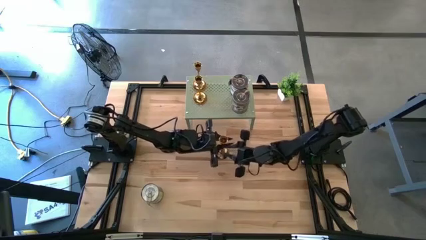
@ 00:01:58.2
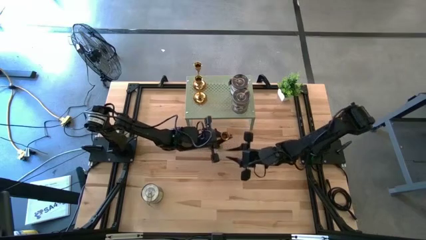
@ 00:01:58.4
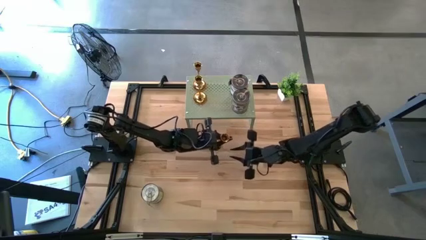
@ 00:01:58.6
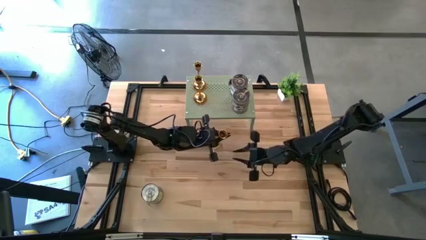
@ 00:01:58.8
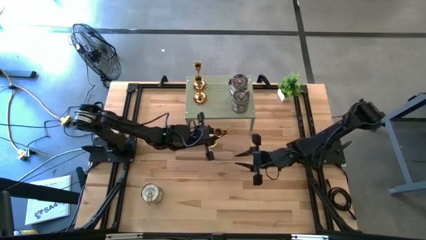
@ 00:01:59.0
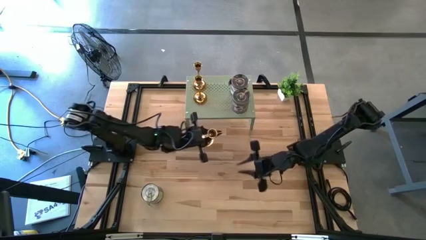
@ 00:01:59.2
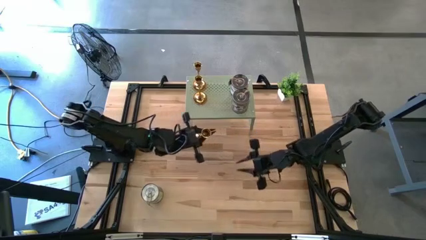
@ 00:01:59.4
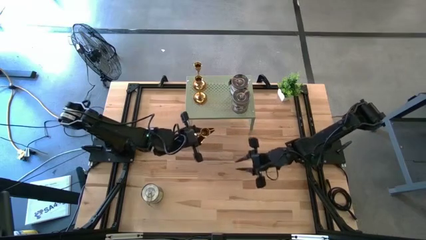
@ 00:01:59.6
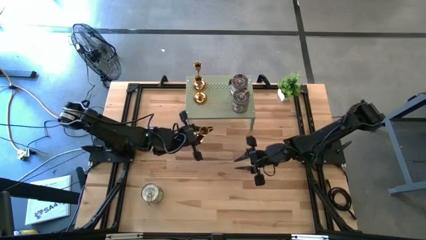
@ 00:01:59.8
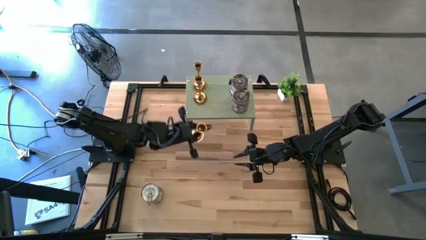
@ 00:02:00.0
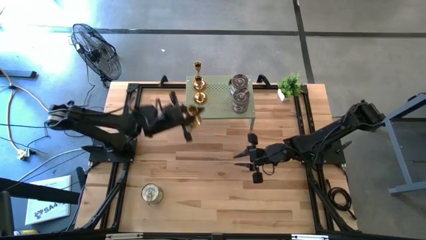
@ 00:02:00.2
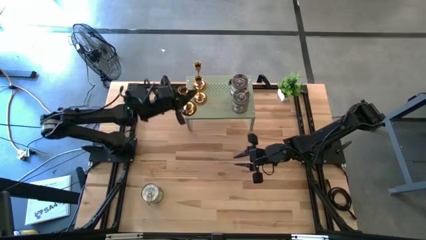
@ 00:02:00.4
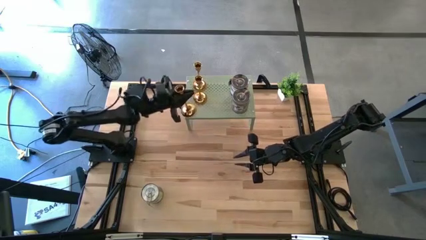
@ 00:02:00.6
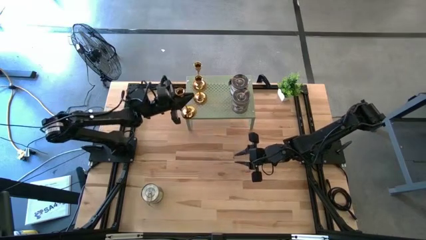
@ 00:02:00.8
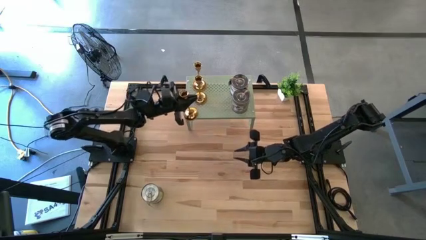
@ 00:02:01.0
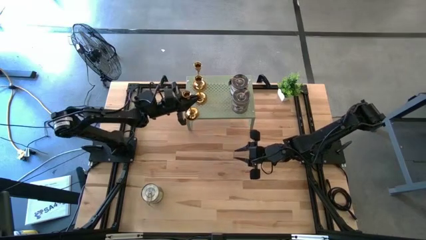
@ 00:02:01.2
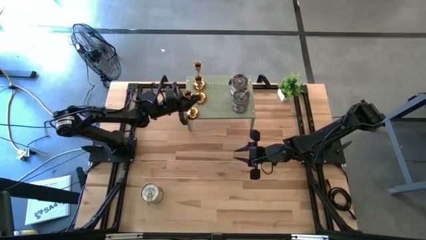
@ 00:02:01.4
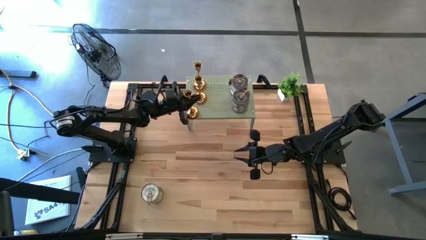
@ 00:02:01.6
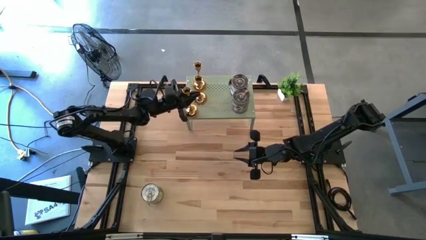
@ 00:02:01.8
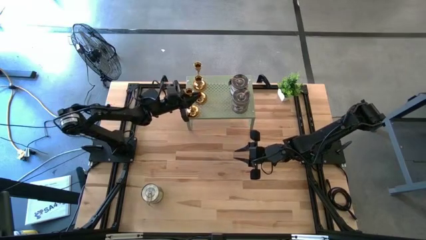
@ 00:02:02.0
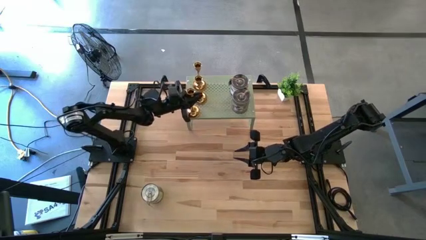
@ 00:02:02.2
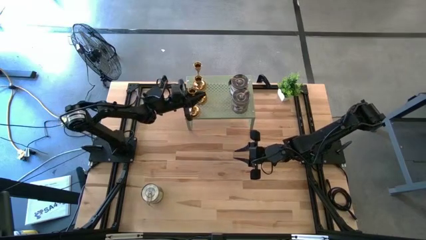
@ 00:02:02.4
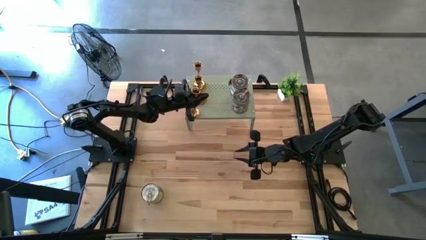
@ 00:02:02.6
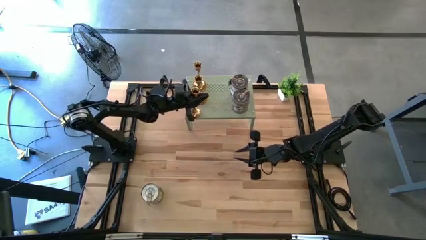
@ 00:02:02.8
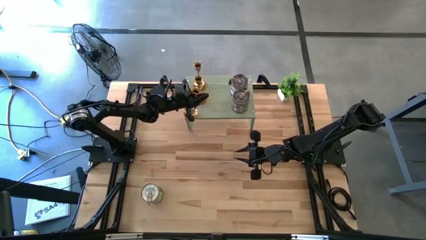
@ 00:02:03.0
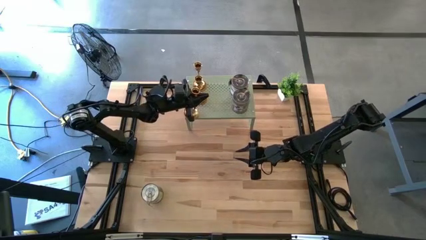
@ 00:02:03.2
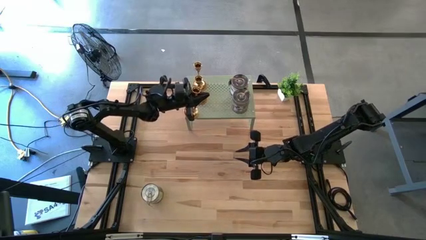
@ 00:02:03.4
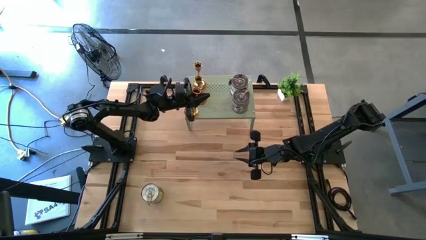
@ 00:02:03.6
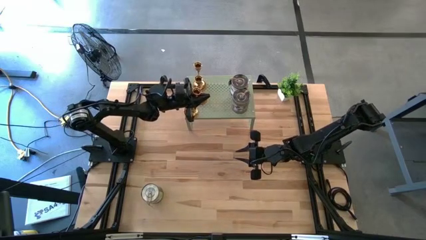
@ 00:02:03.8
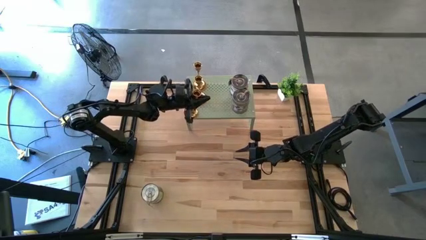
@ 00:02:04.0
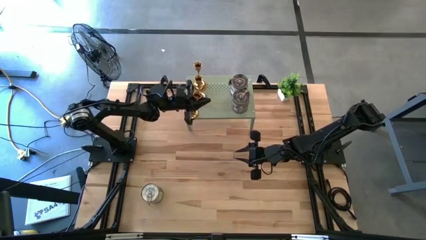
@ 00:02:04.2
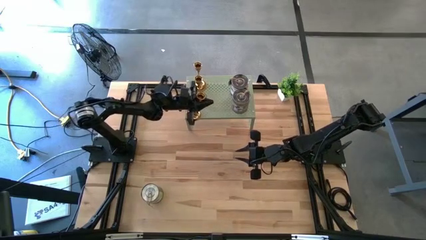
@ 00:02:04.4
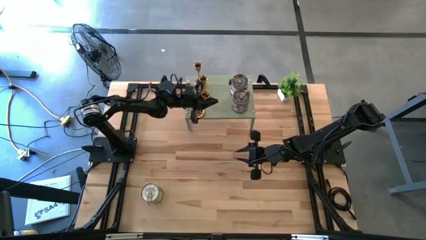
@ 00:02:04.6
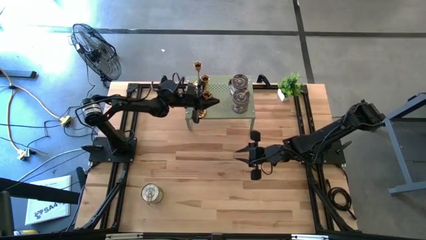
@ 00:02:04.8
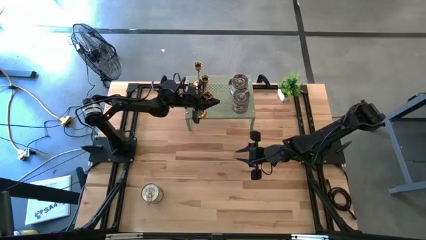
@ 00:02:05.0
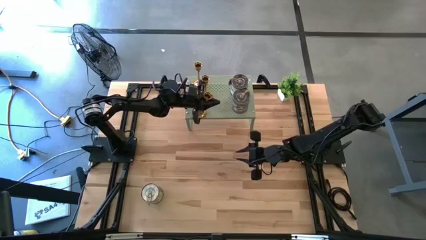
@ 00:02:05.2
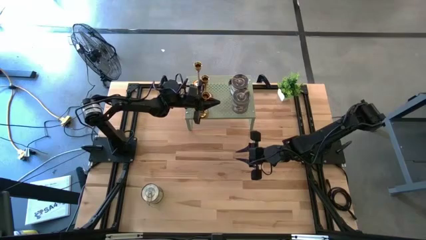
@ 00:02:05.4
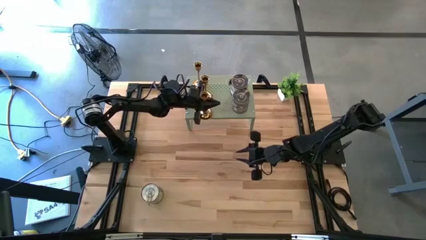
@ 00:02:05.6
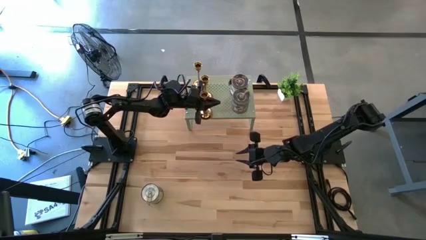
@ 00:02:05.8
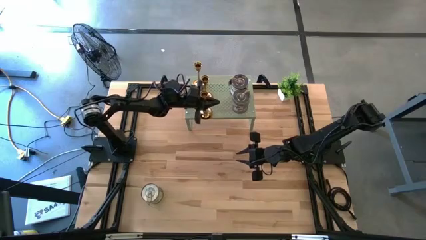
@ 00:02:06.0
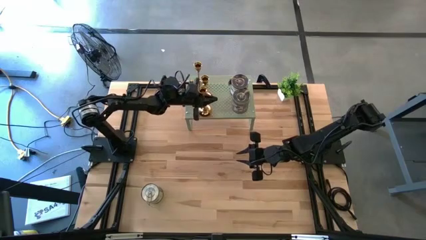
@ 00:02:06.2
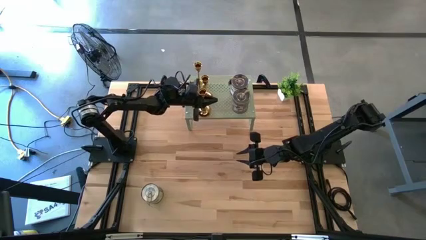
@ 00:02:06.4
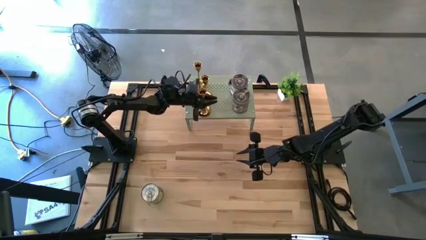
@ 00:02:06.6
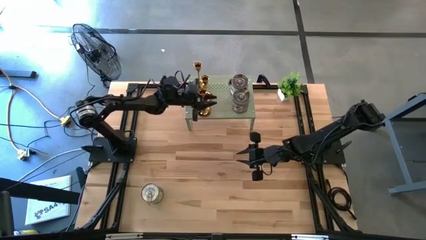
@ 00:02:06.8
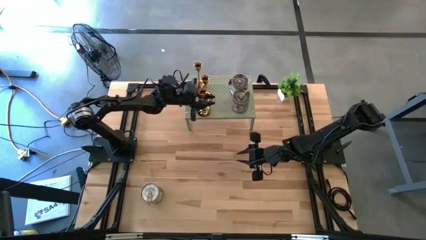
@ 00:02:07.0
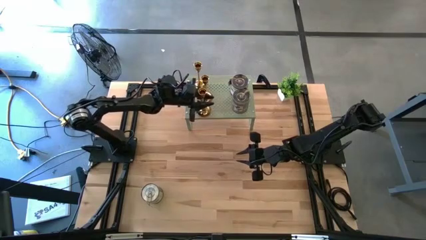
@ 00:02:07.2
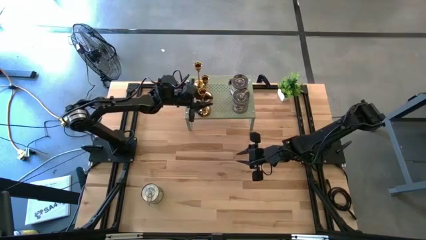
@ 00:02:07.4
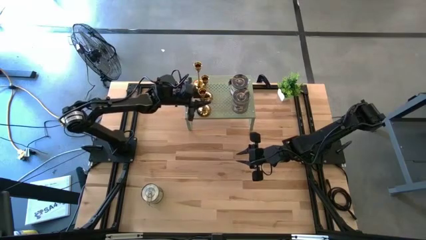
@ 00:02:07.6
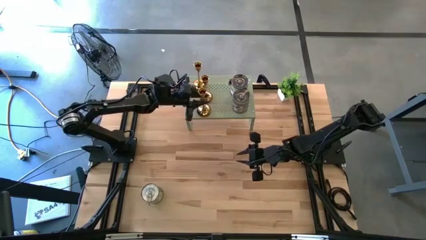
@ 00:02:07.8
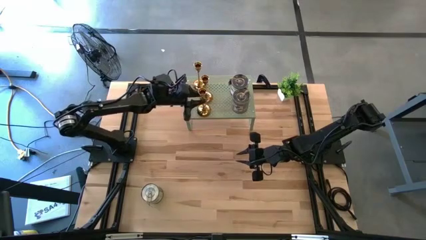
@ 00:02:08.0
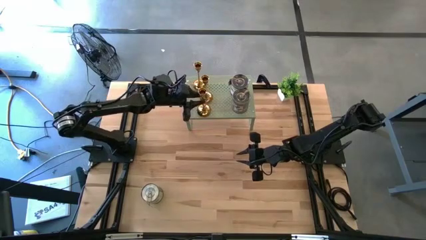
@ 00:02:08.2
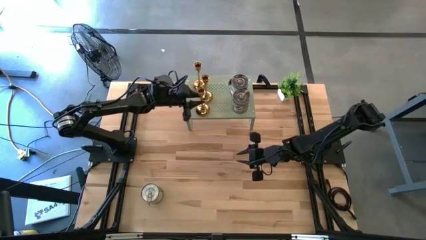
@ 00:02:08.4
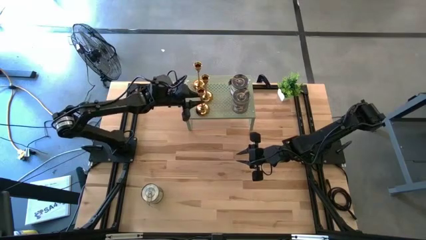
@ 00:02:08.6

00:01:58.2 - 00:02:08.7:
Task: Pick & Place candle stick holders
Put the gold candle holder on the shelf aligned with other gold candle holders

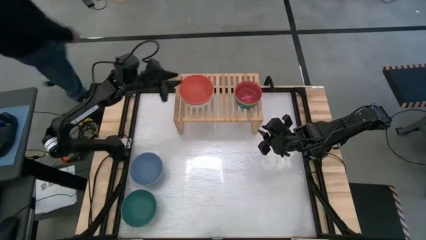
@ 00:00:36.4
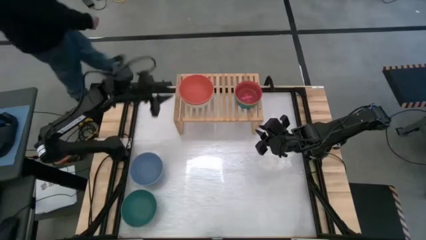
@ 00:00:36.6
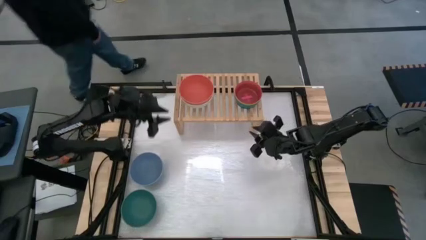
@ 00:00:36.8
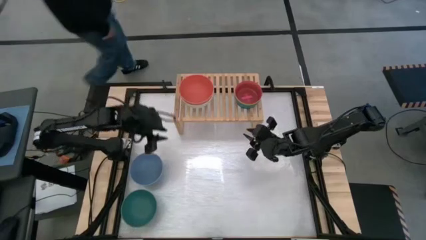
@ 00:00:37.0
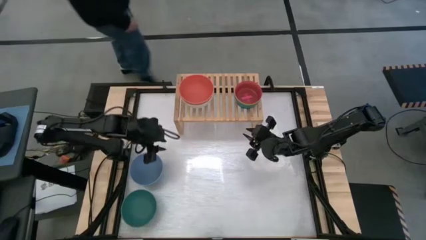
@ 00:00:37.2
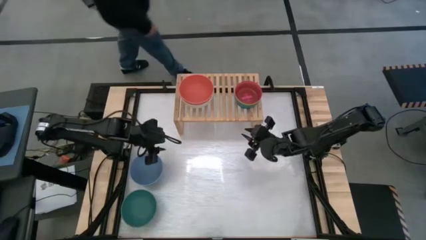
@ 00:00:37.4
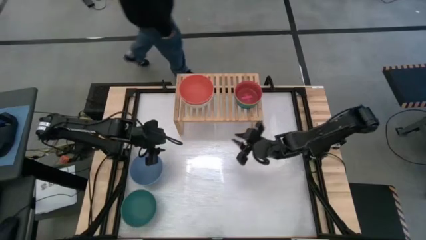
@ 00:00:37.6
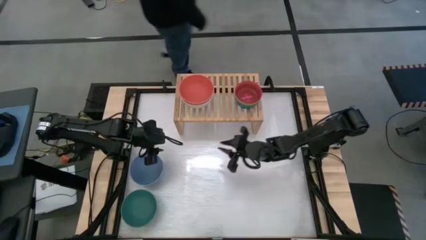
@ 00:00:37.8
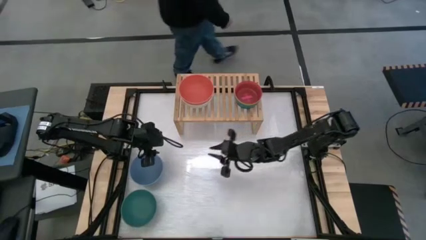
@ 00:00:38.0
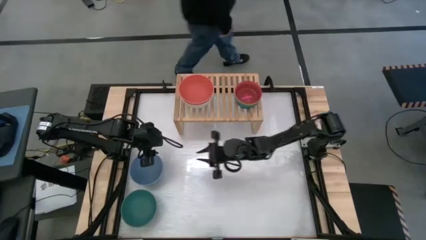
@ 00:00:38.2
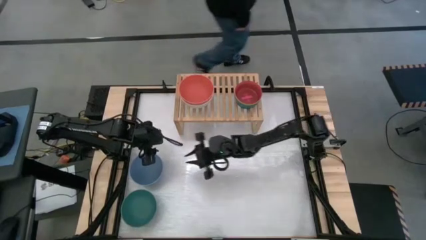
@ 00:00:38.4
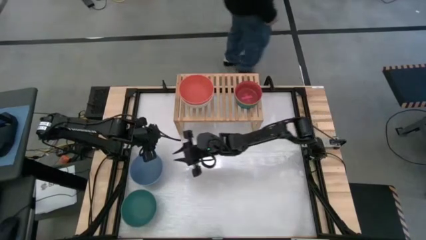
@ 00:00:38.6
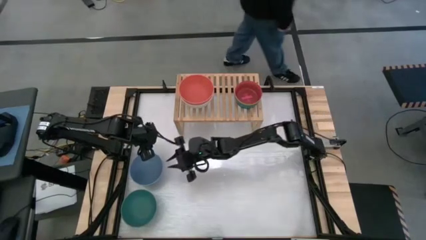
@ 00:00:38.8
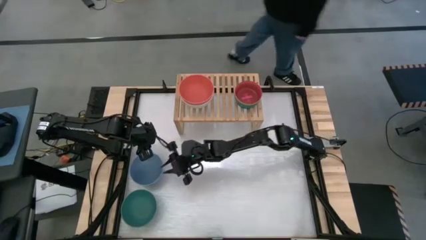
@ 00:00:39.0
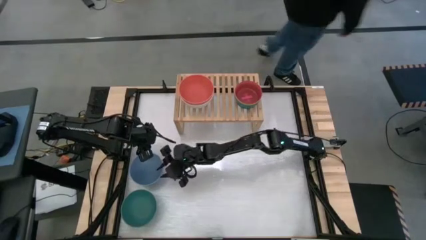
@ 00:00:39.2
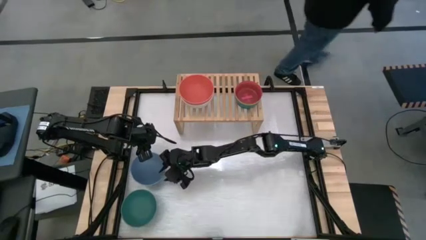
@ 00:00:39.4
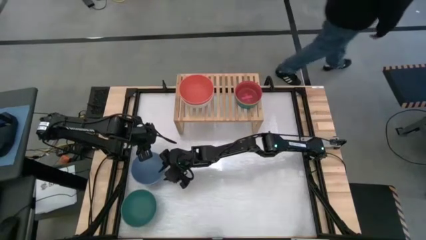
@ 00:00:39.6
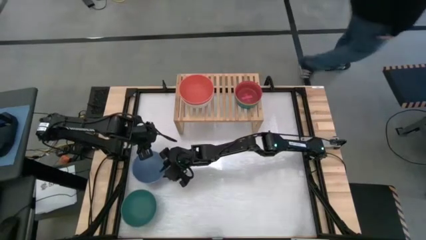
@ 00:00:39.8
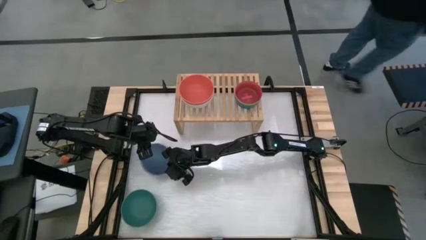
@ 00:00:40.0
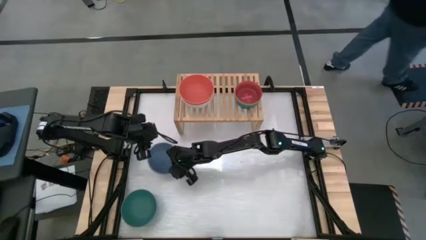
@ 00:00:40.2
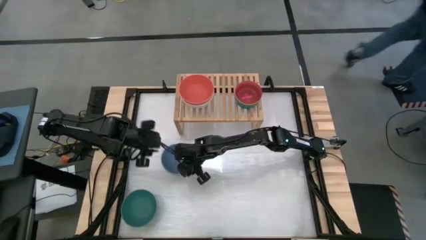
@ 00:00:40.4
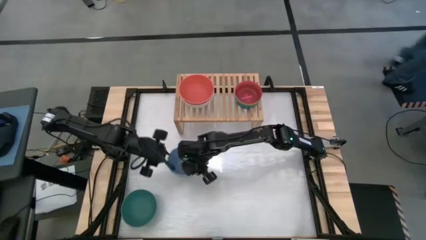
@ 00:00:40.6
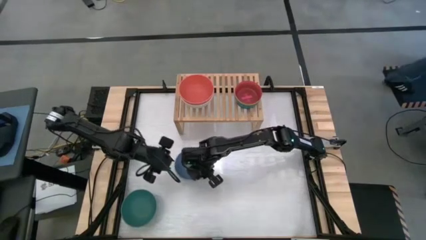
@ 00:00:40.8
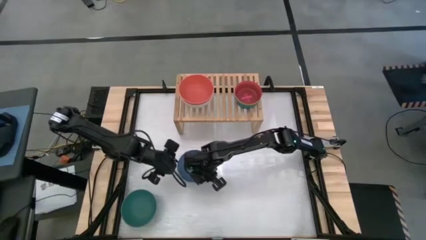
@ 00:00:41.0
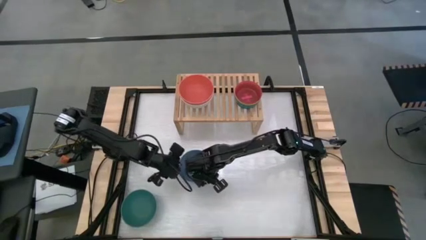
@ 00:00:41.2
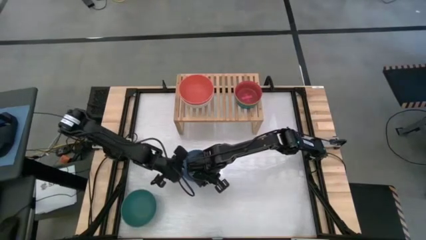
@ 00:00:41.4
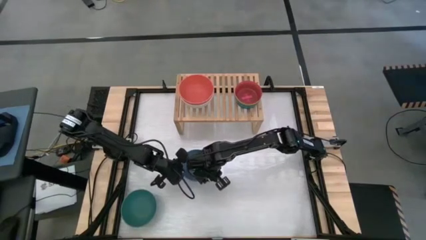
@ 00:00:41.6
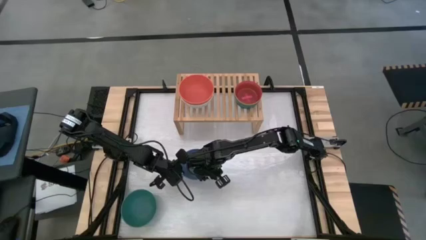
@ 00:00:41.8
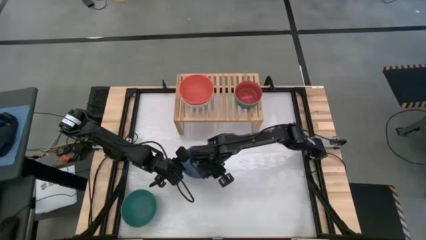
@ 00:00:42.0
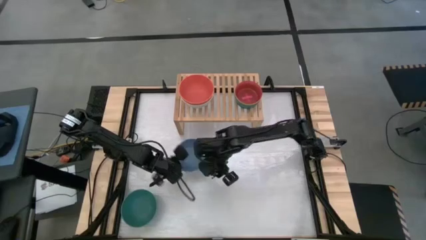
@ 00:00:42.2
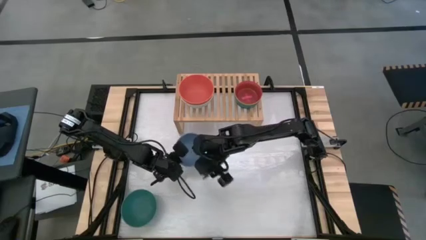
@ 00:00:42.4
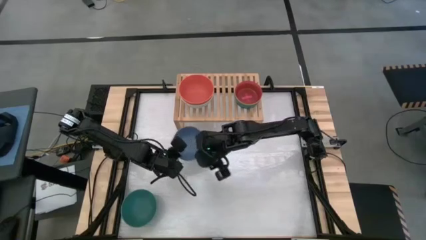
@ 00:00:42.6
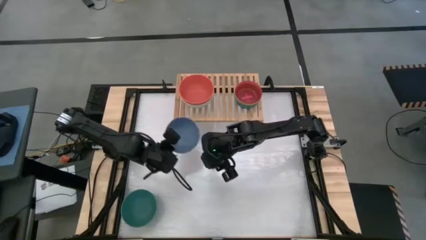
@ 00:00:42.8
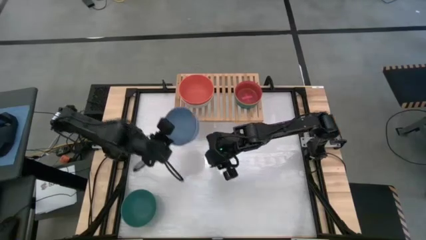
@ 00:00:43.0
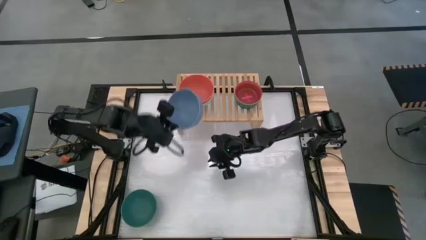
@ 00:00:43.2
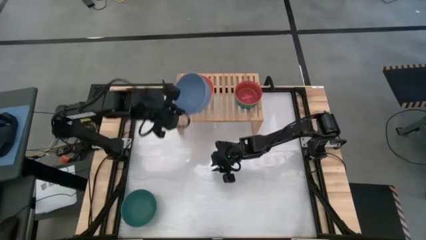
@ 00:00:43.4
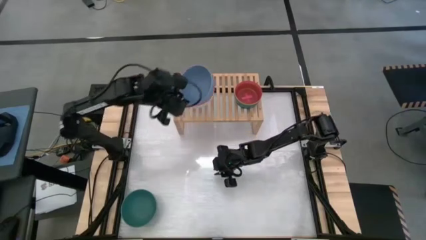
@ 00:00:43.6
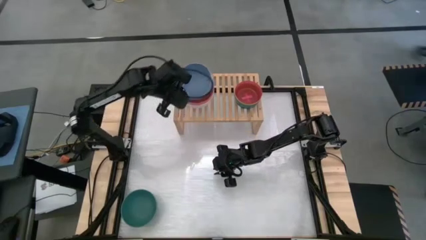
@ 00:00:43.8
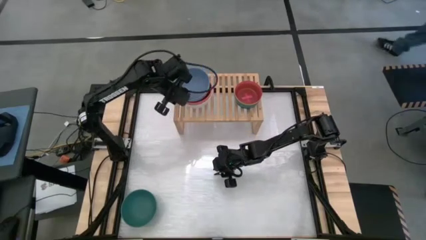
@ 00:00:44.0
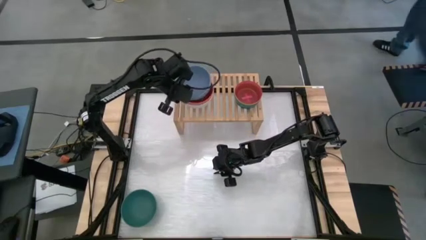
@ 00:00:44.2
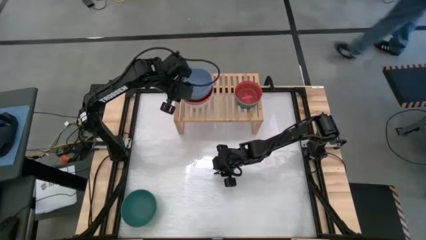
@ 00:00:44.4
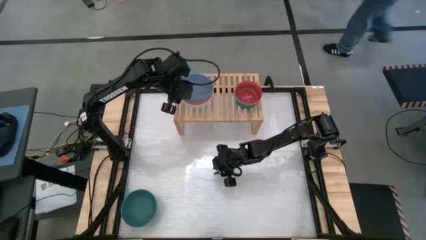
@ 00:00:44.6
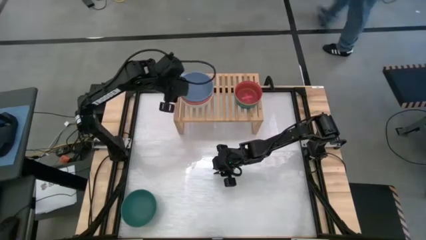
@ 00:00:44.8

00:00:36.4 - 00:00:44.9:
Task: Place and stack bowls onto a shelf
Stack the blue bowl on top of the orange bowl
